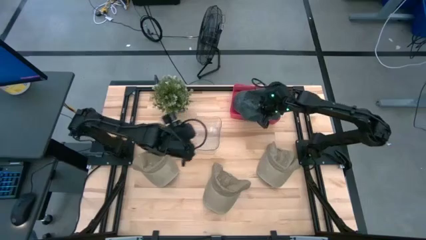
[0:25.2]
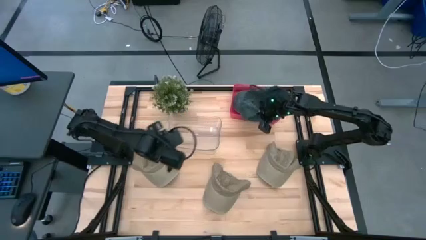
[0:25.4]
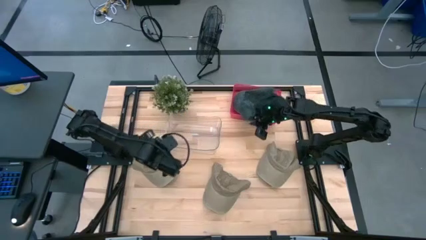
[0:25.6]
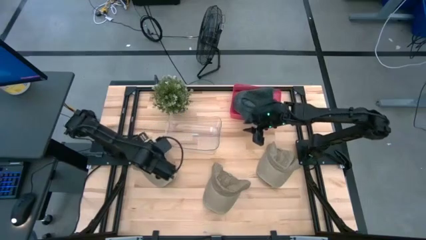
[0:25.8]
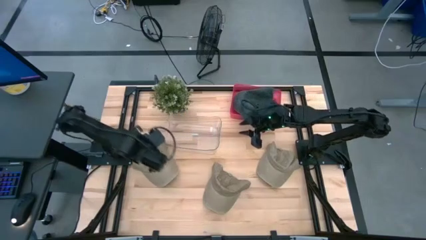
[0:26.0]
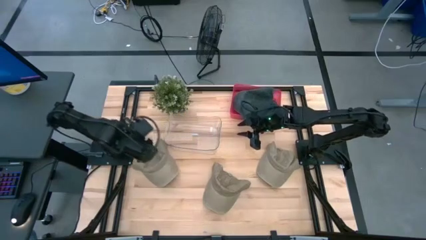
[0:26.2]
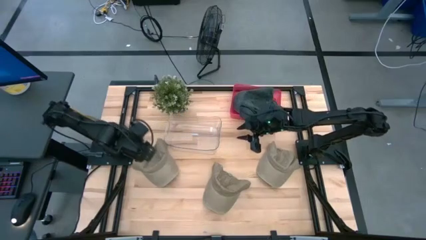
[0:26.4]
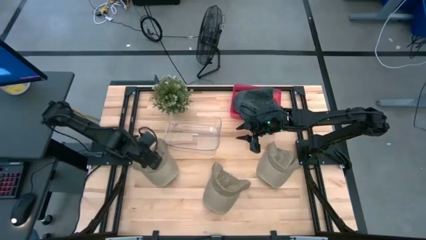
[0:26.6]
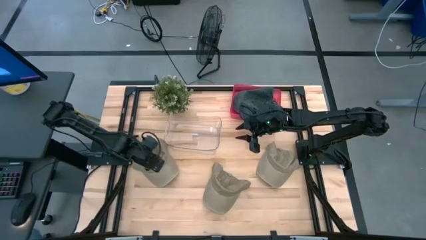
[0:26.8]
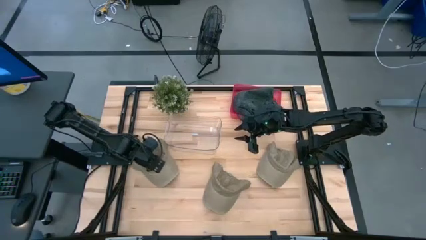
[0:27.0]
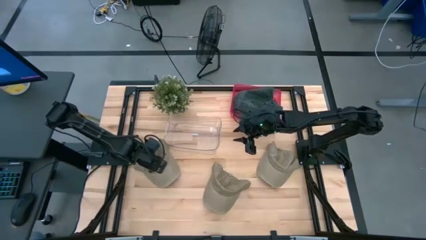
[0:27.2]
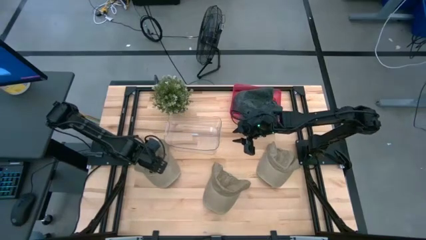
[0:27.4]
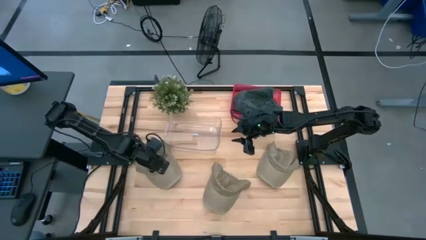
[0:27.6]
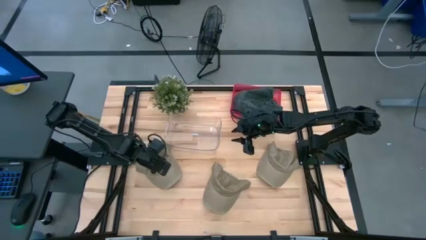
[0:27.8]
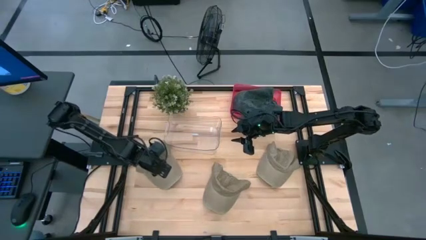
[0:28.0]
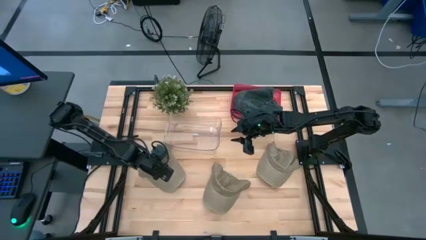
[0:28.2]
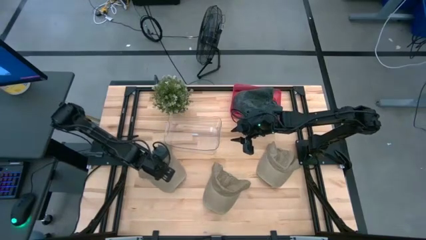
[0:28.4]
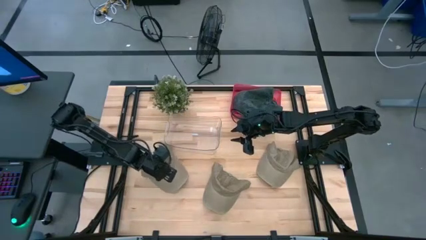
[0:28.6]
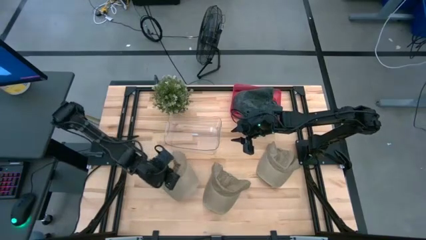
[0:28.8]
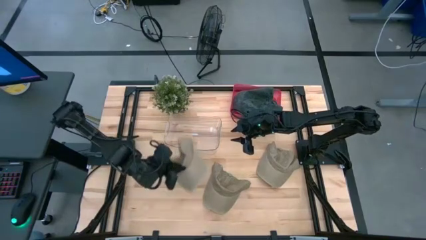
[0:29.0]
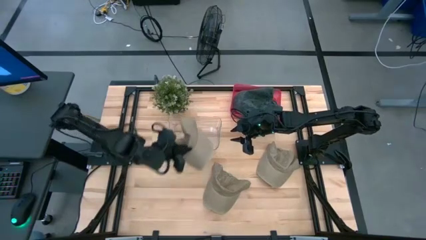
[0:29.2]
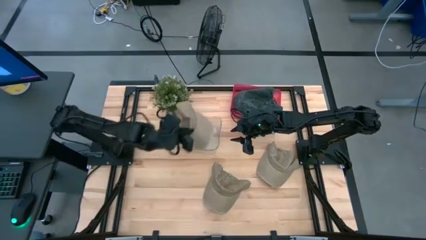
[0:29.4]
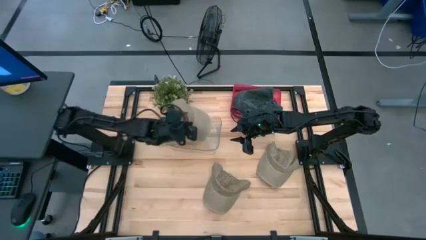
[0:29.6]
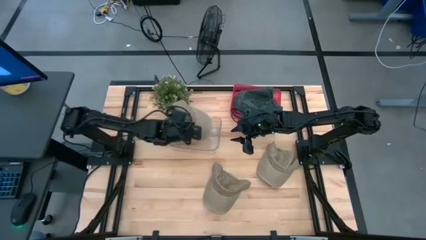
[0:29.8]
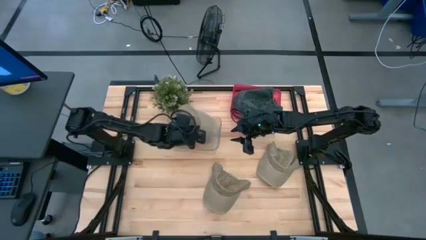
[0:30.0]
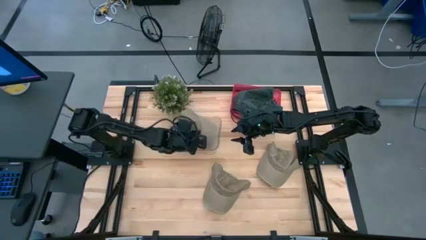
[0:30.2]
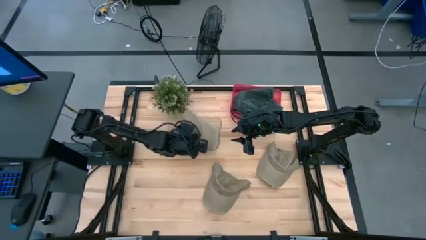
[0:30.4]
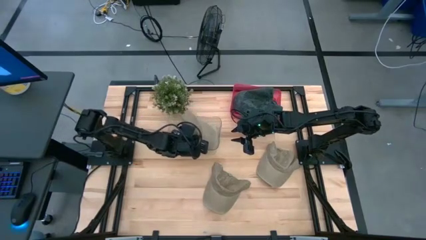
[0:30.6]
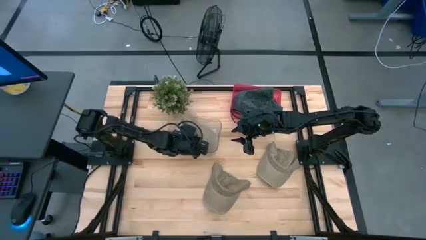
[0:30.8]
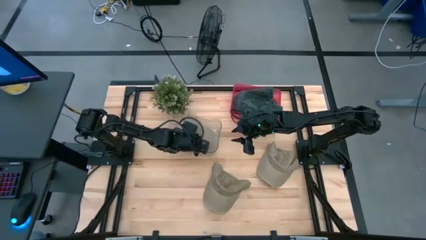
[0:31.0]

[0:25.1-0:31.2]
Task: Pick & Place hat
Put the top left brown cap into the transparent bin

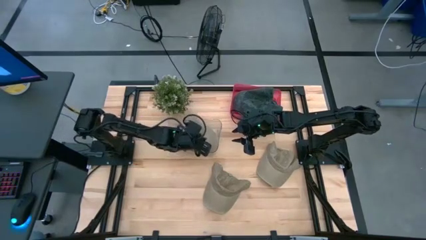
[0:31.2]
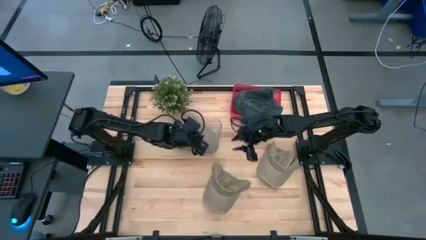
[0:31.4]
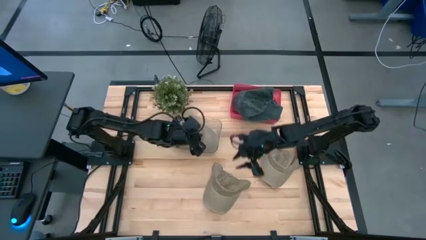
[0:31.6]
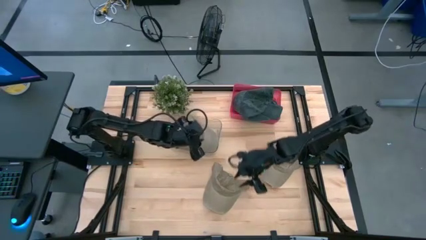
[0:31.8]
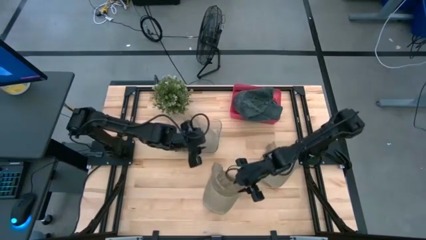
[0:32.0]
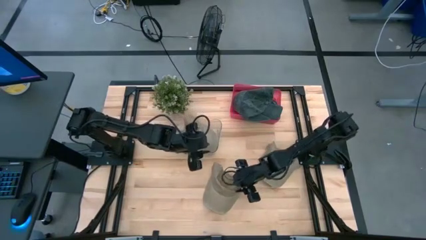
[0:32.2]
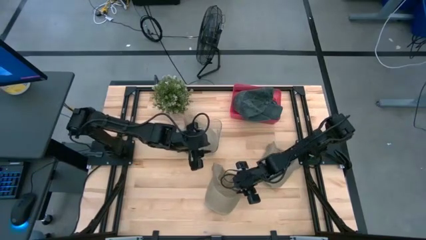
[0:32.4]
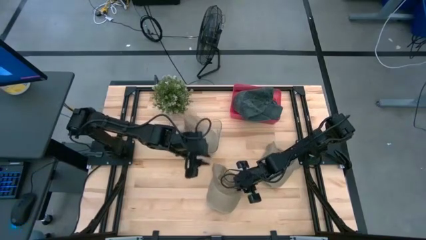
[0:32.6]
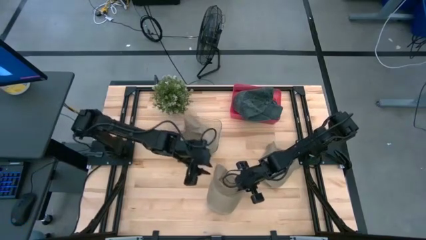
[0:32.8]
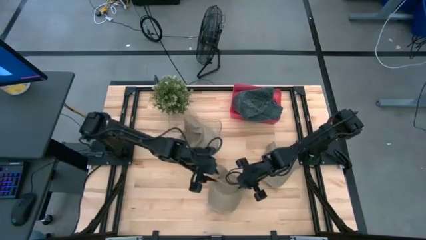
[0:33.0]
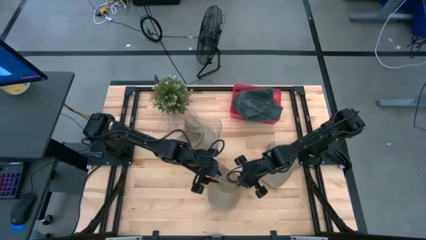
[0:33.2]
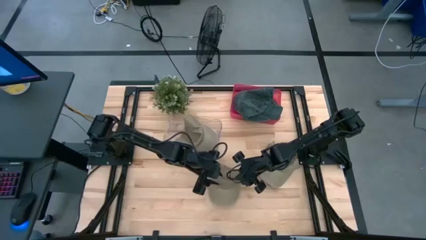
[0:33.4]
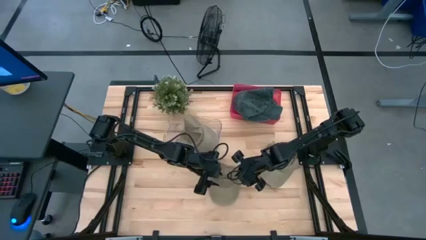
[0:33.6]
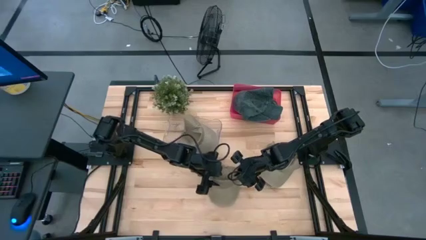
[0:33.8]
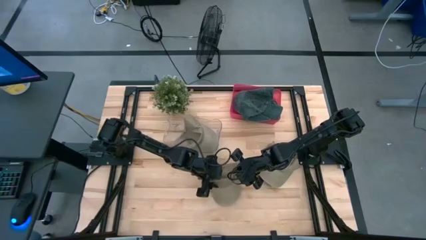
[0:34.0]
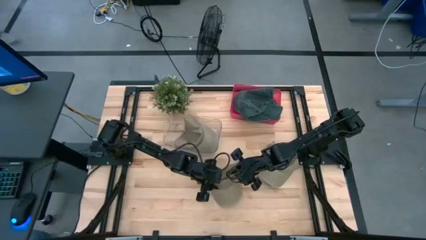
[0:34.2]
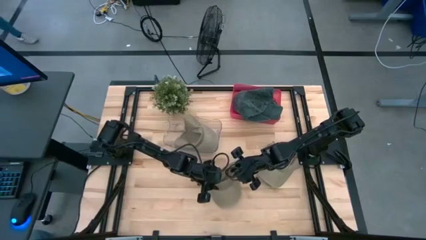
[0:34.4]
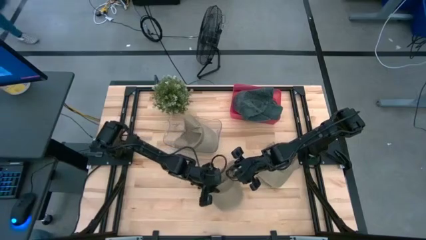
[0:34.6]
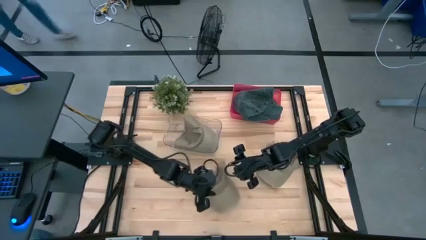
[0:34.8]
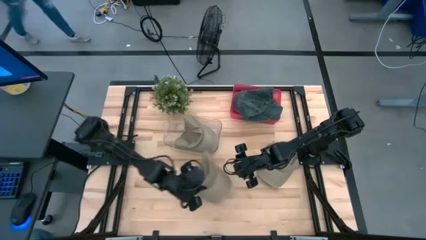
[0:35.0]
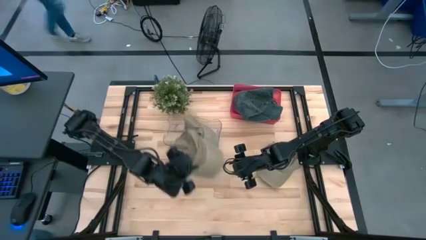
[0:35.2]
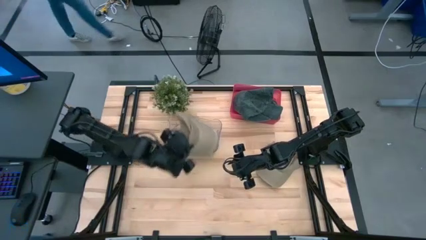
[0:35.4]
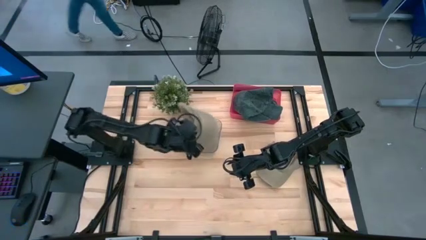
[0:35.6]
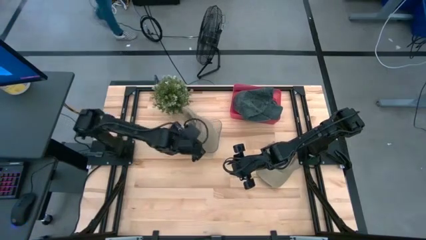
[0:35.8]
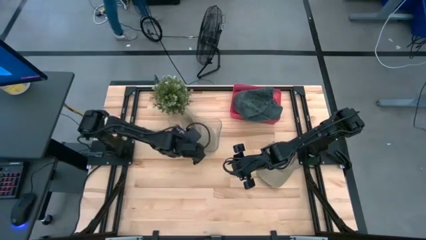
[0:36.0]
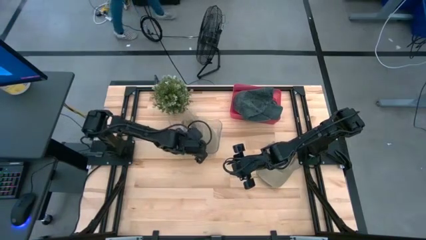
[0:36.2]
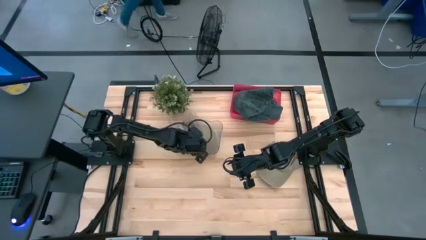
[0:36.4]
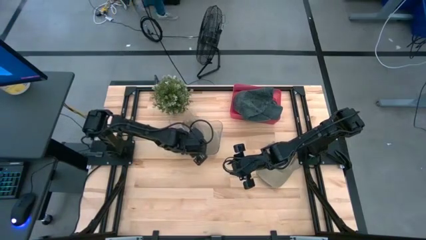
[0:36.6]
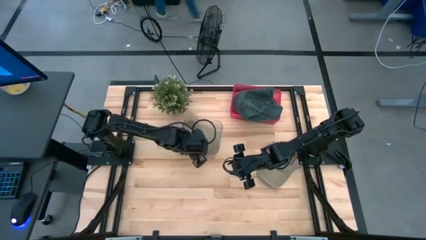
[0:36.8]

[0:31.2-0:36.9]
Put the bottom brown cap into the transparent bin

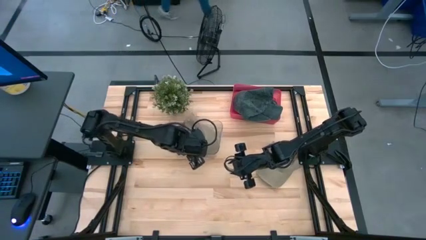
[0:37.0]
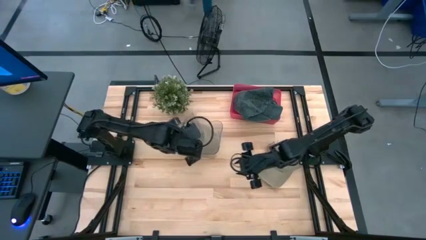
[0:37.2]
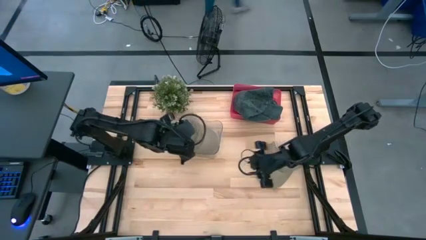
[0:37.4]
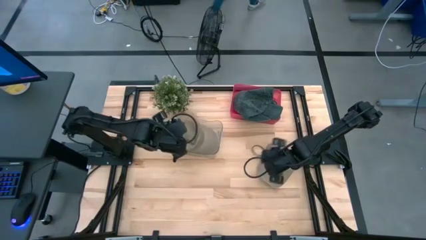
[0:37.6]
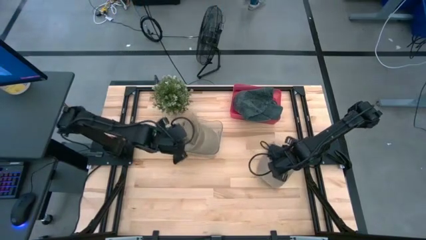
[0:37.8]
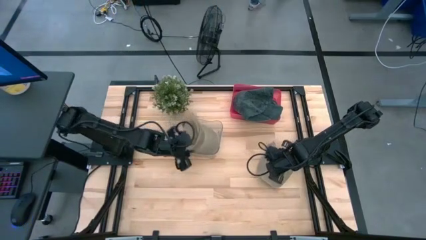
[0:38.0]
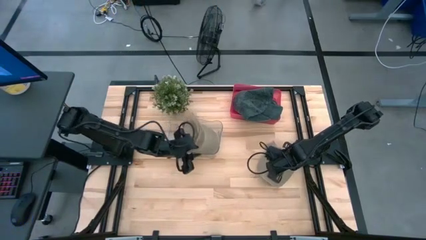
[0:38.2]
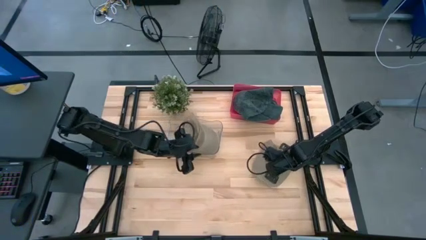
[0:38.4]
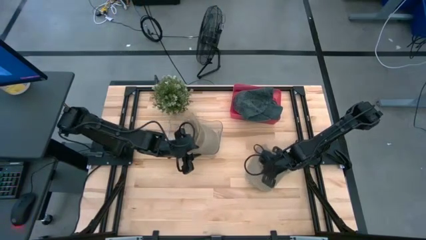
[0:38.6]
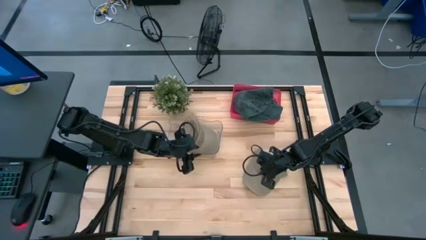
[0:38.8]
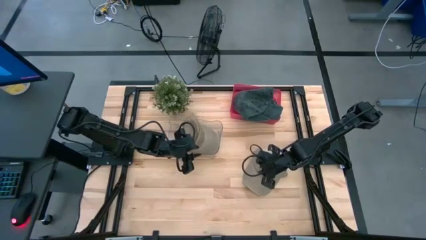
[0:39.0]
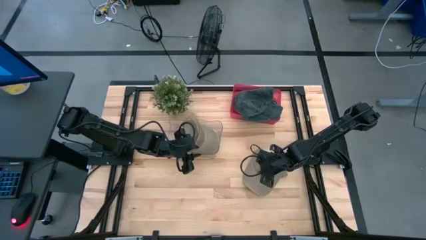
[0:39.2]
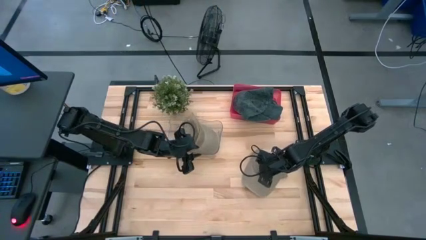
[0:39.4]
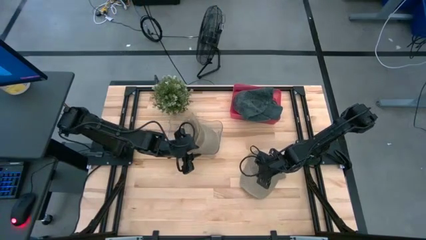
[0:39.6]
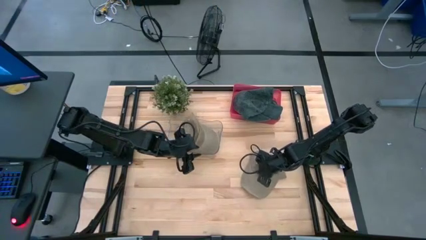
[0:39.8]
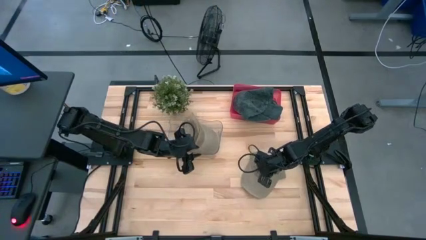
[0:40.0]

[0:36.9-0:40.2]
Put the brown cap into the transparent bin

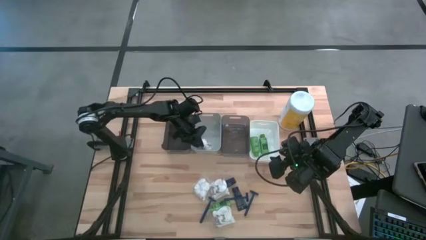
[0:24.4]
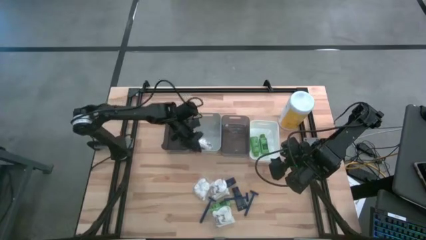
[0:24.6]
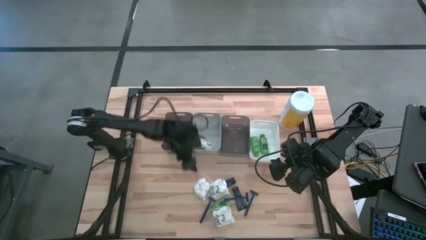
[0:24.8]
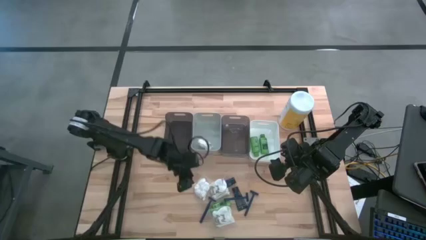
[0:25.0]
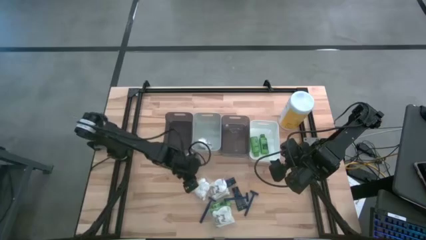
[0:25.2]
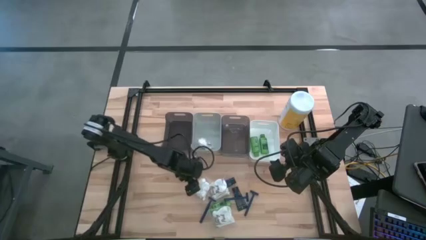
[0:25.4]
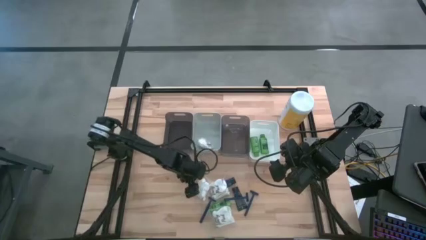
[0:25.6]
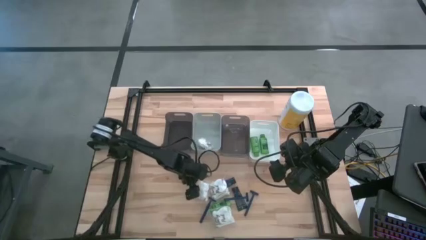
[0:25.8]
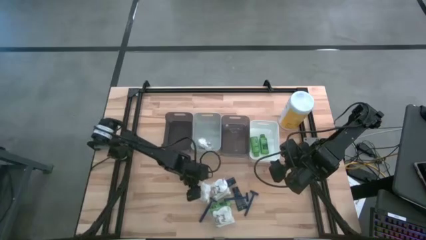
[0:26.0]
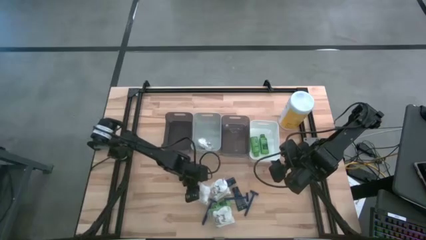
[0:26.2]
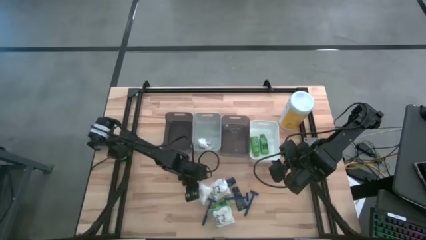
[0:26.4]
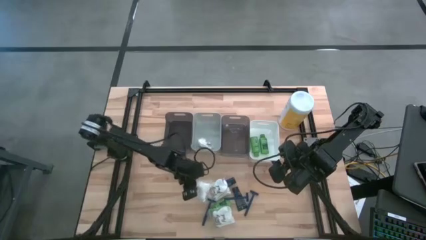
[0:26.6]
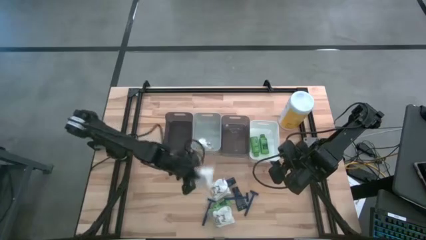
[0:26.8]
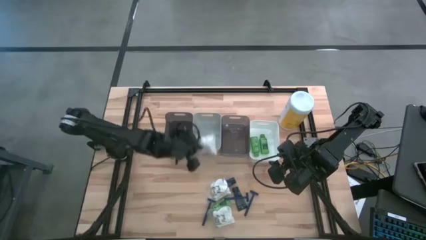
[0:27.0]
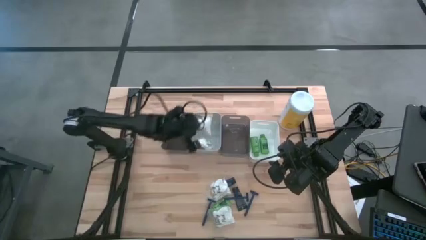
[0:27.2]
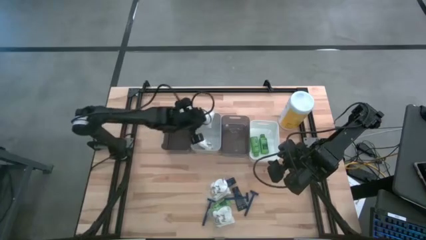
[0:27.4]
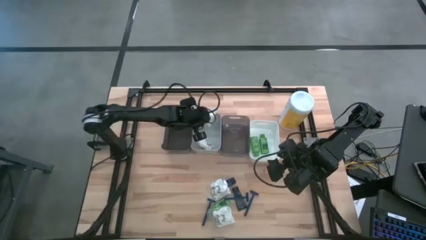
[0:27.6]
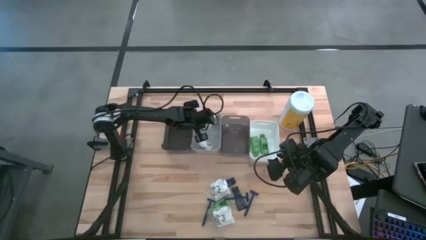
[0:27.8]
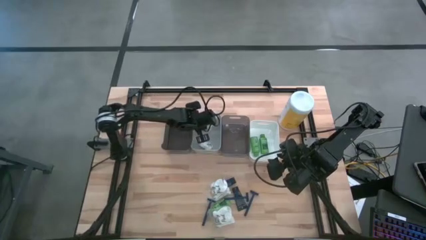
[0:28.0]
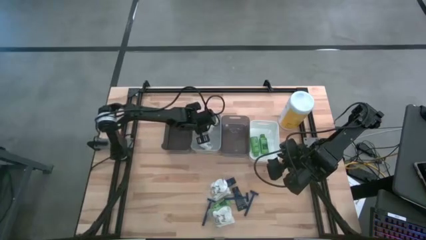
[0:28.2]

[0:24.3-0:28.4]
Task: Pick & Place Travel size toiletries
Put the white cotton pack into the gray bin
